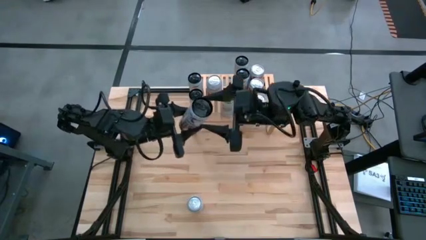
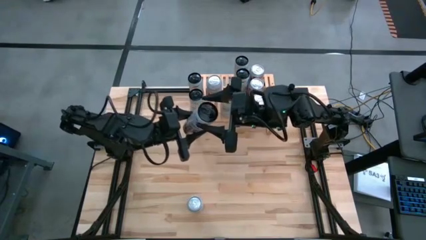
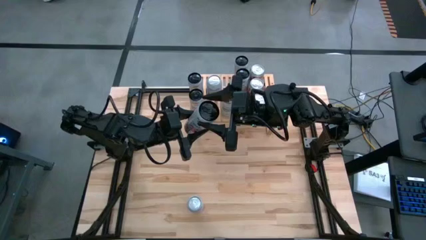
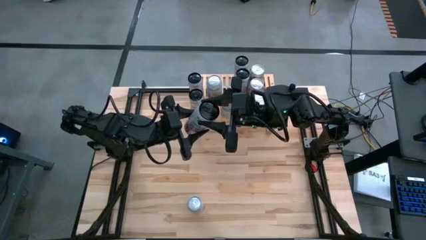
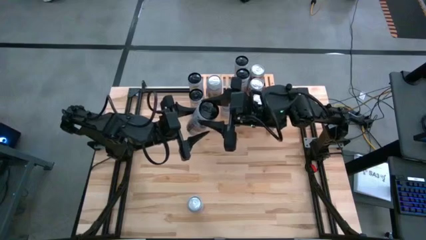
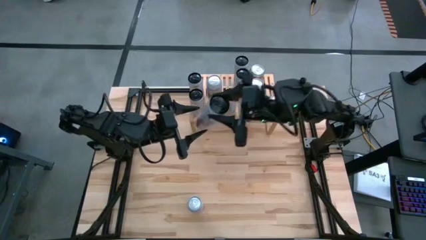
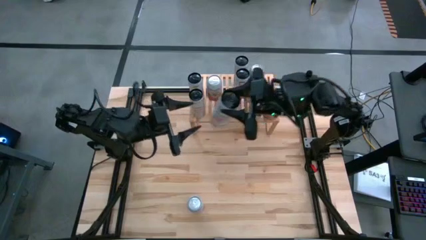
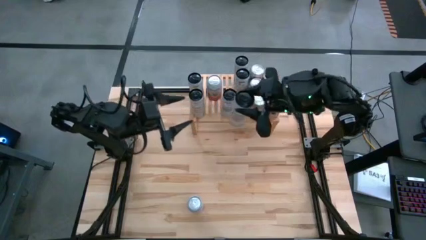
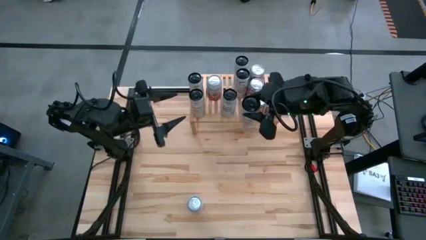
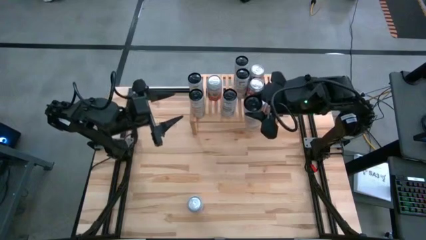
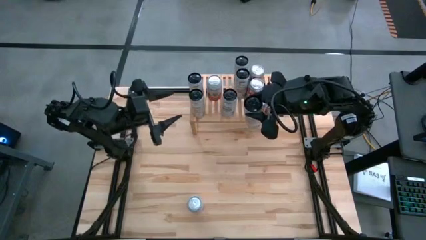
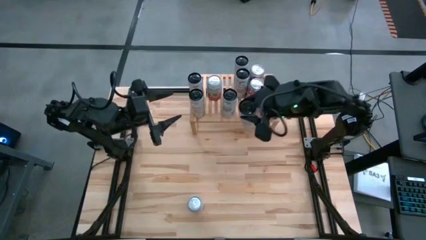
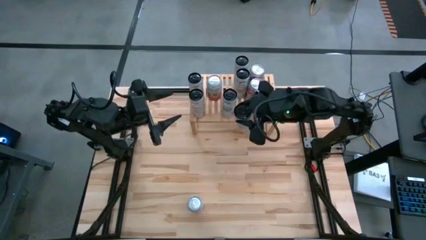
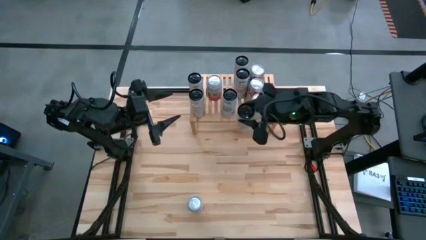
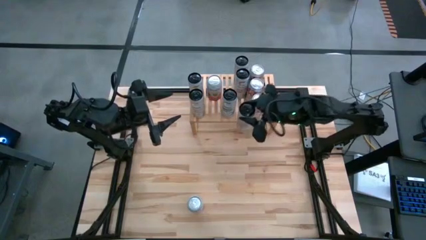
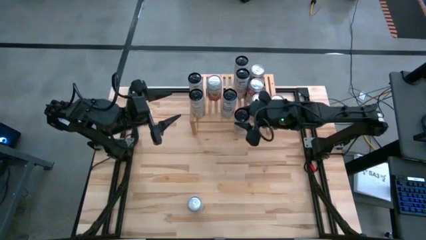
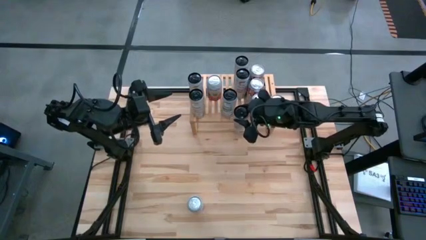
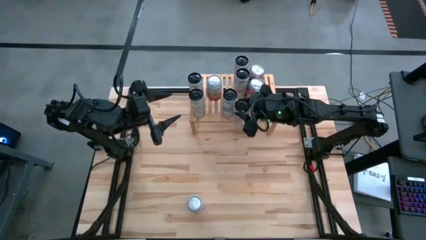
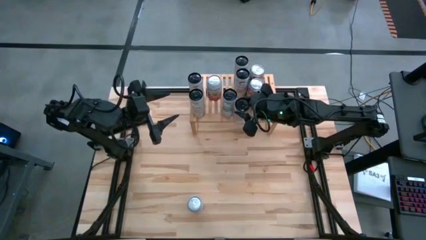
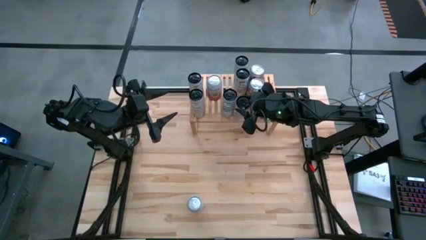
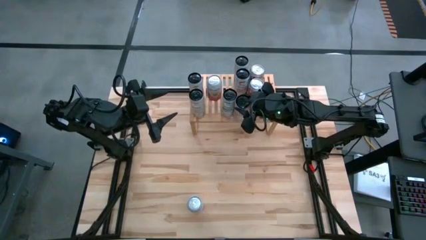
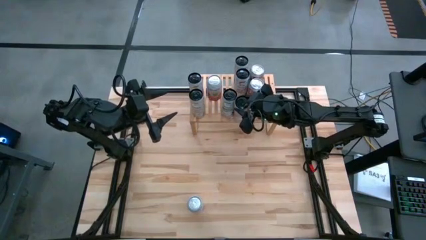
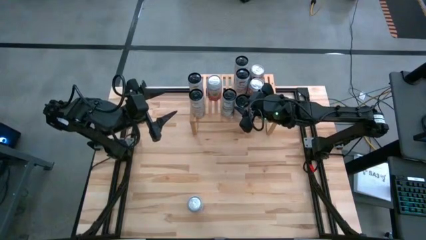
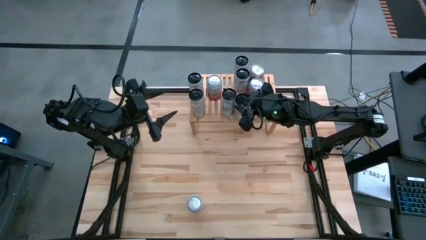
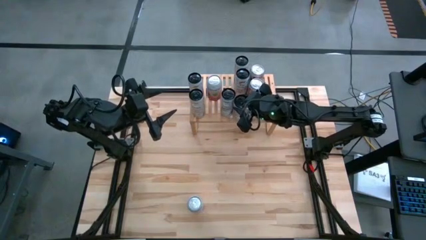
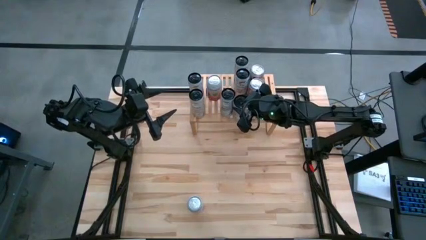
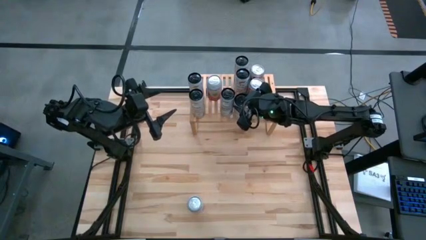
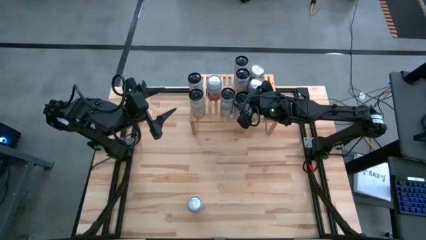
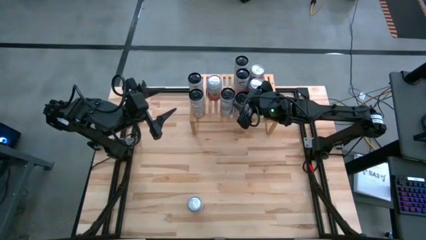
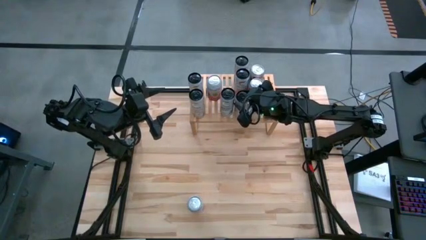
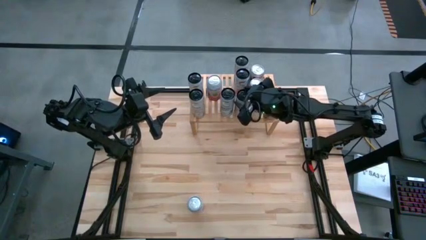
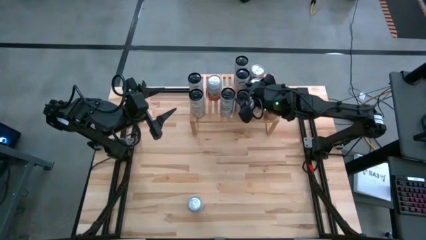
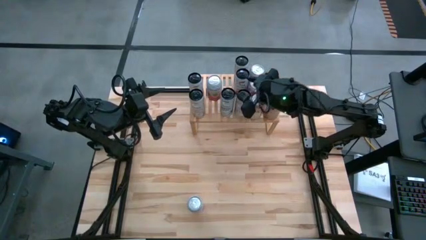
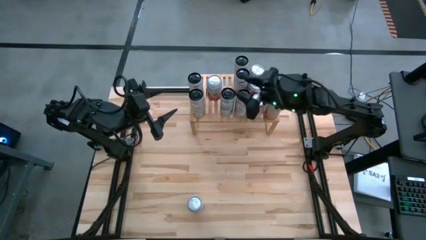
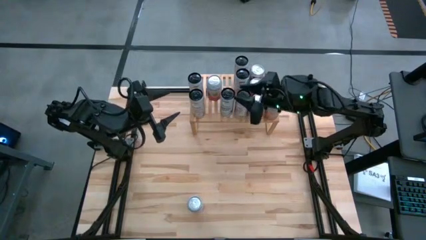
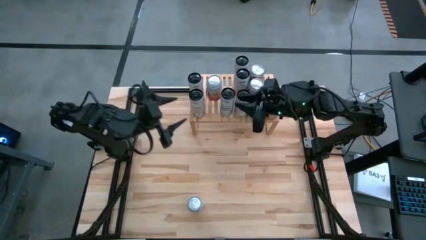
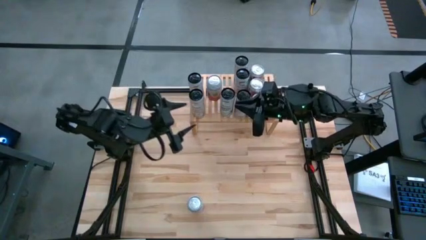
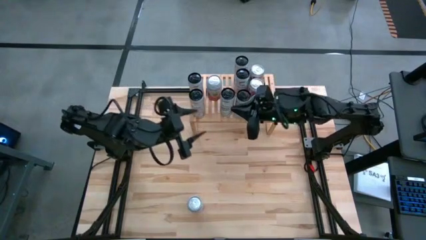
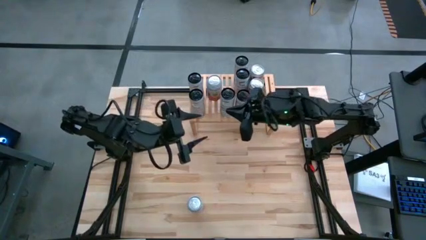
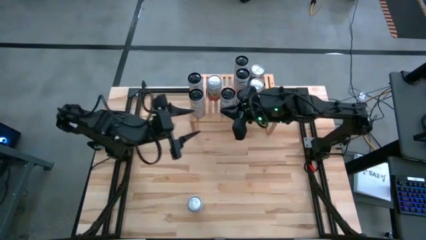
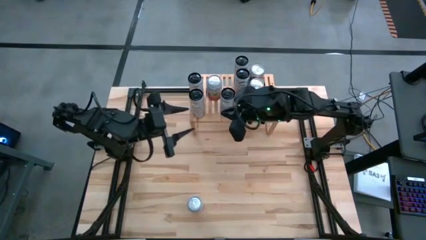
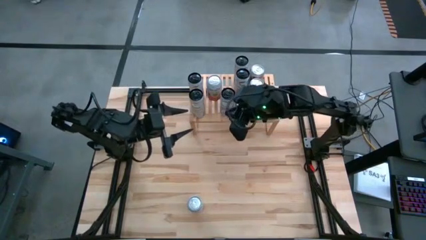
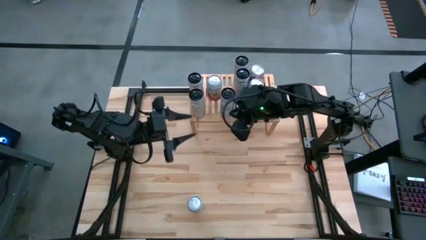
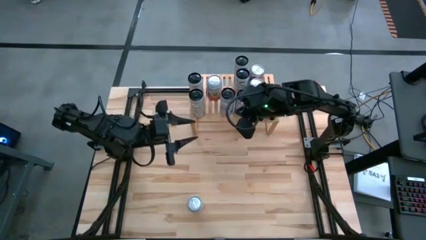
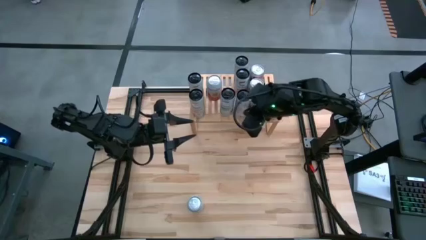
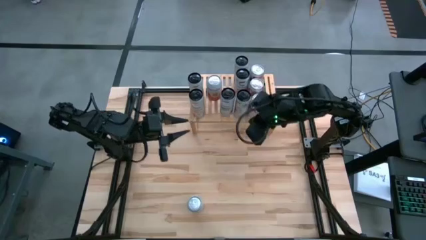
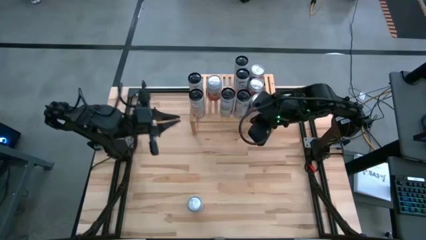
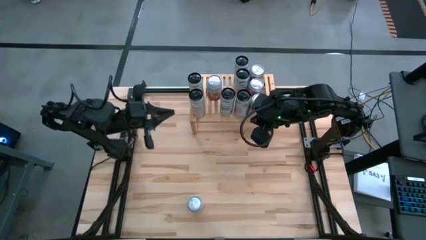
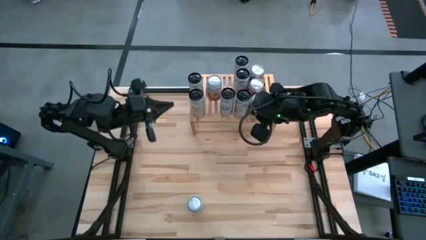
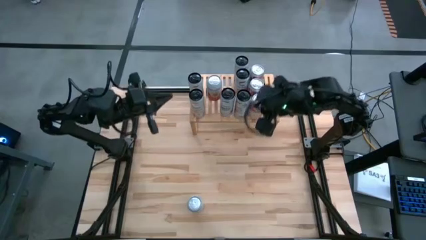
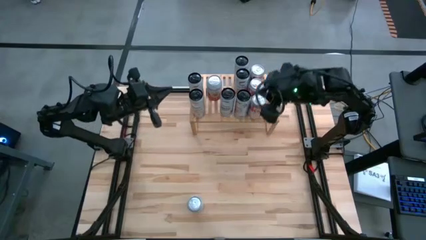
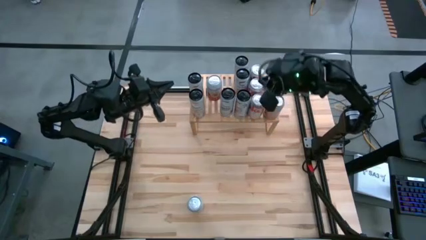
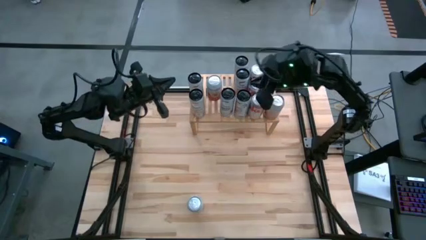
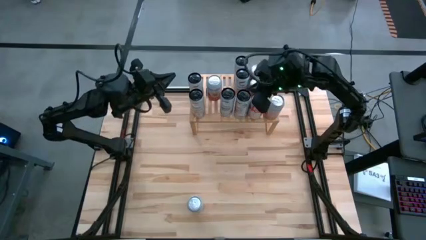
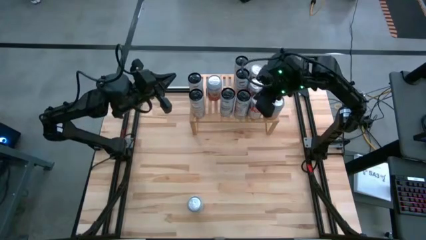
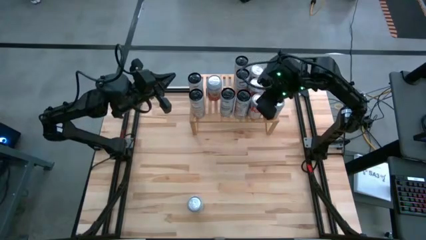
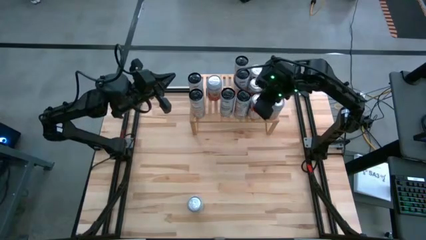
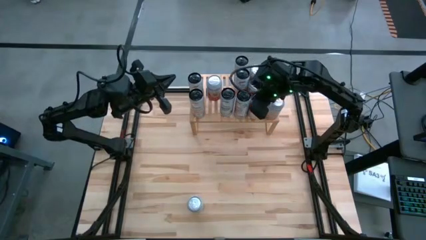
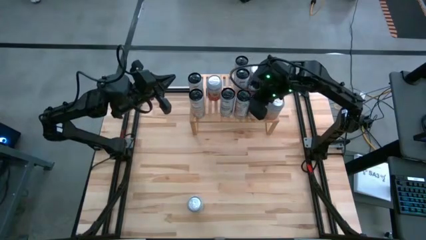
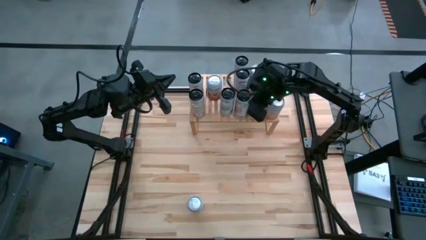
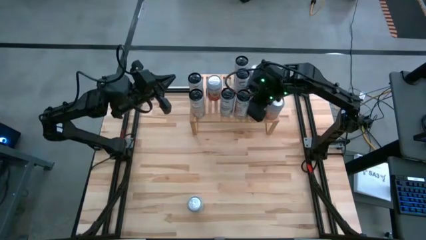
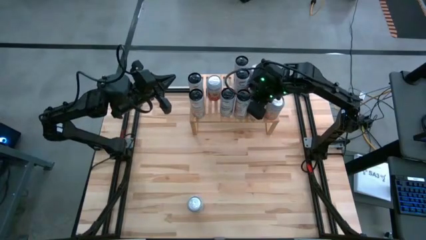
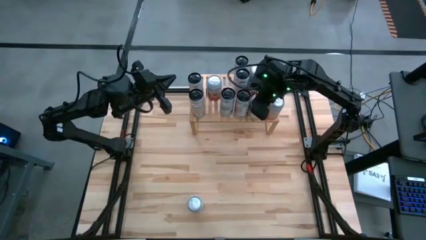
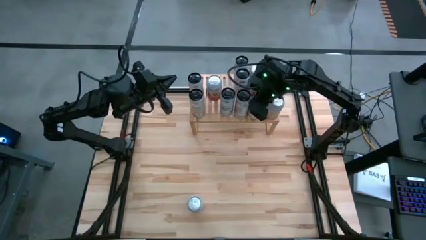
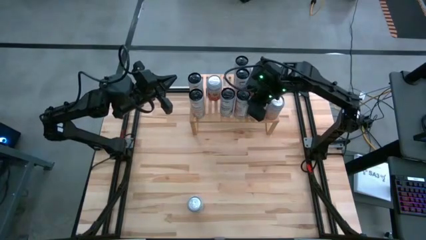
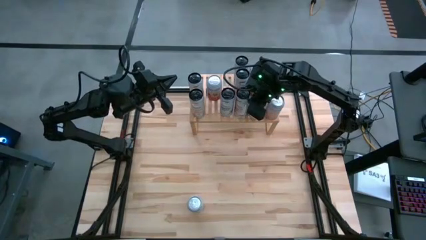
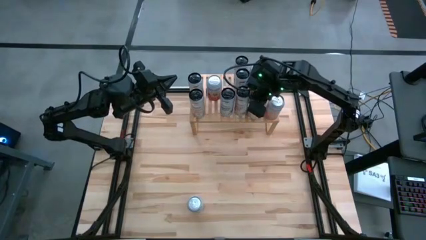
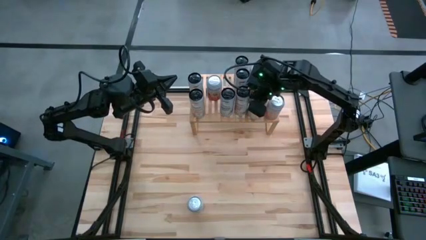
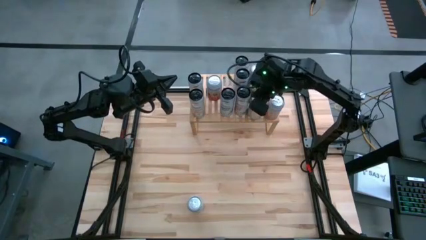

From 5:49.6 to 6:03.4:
Task: Place canned beverage on shelf
Put the white soda can on the shelf aligned with the other white soda cans

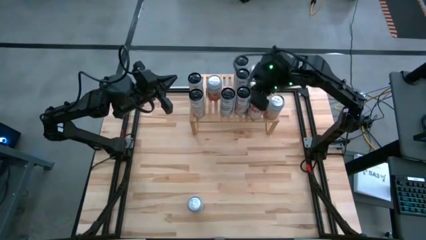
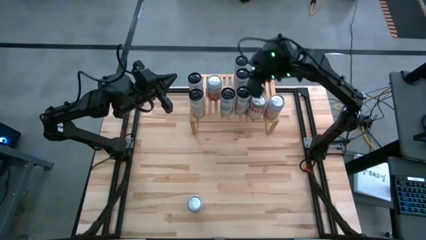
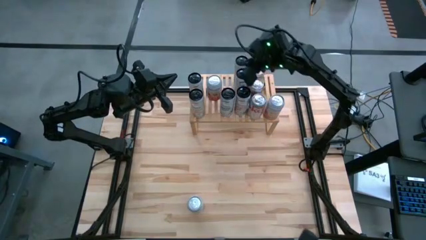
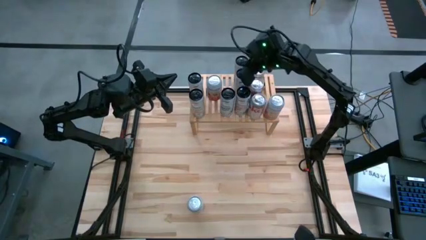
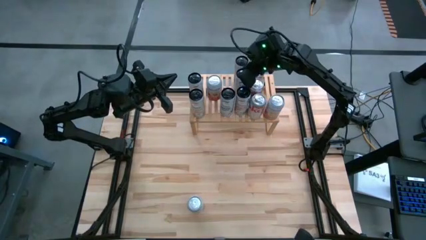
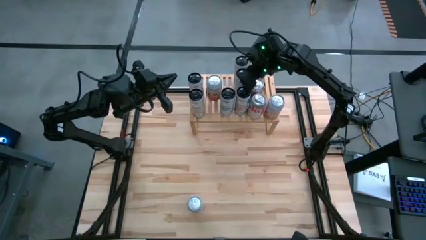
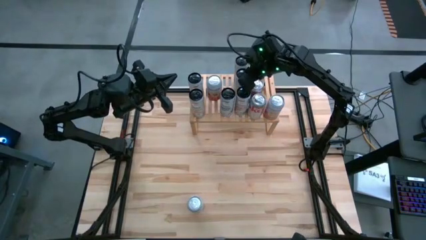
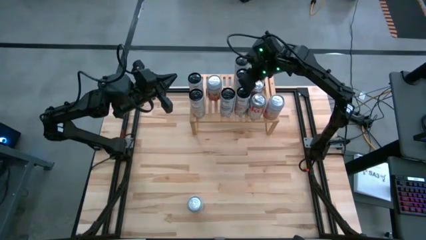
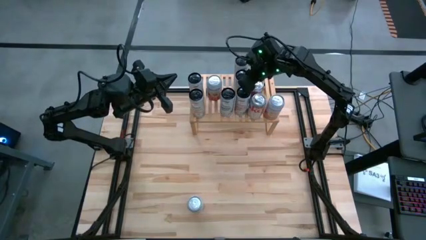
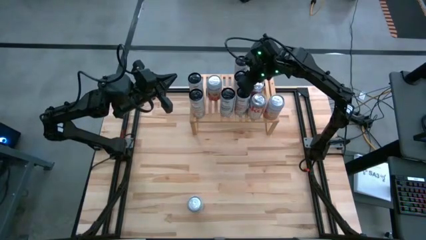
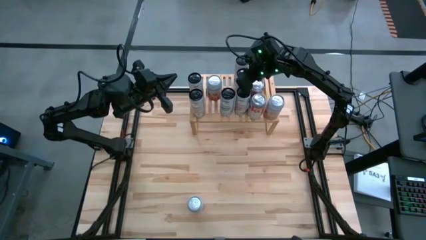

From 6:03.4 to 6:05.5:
Adjust the middle white soda can on the shelf

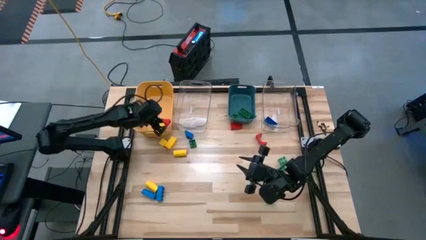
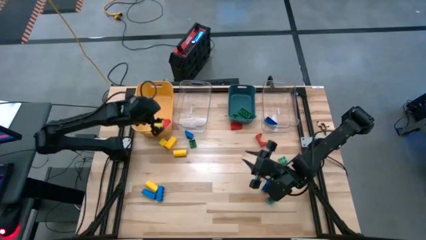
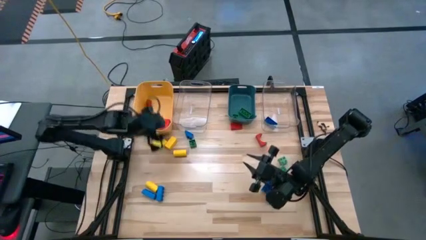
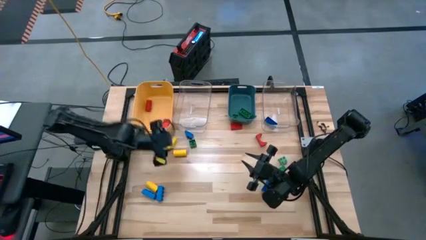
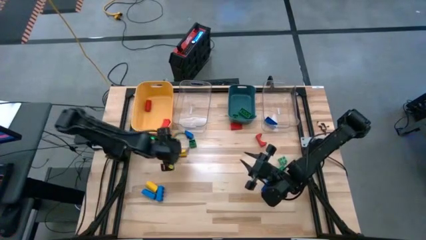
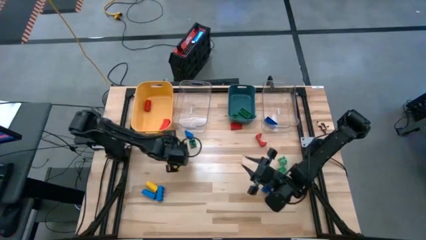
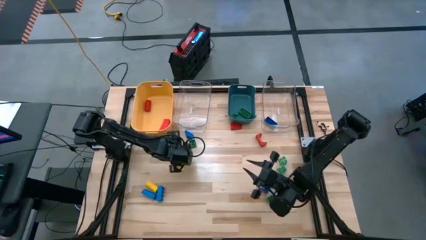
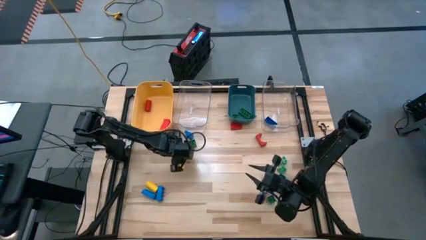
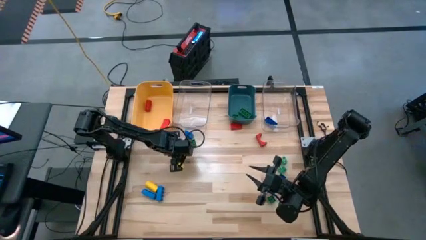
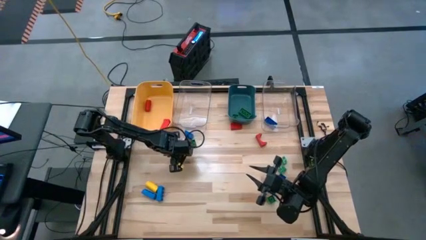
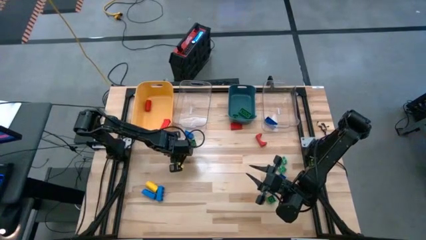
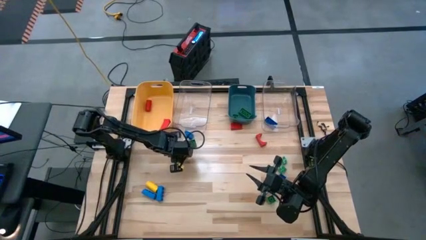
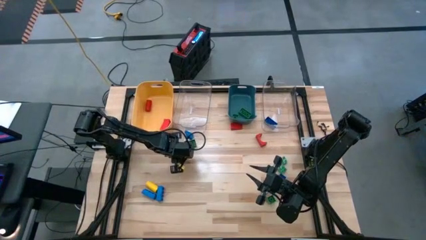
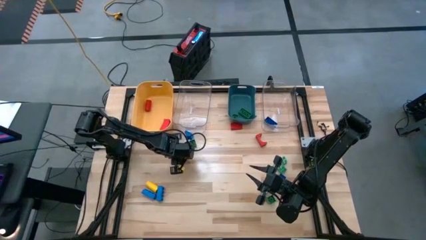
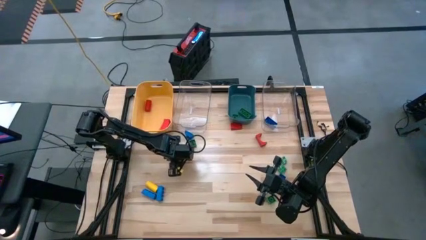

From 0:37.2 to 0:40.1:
Task: Sort blocks
Put the yellow block into the left transparent bin
